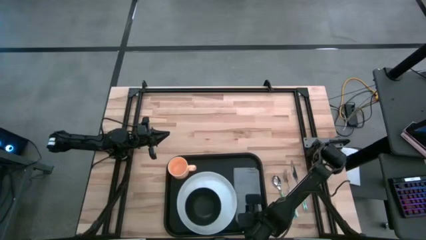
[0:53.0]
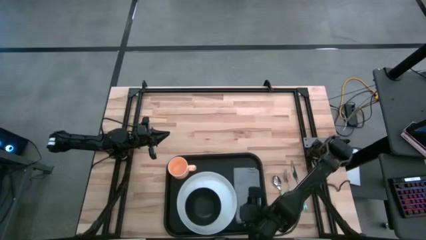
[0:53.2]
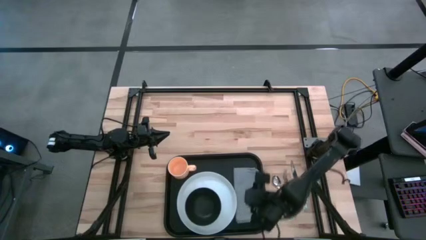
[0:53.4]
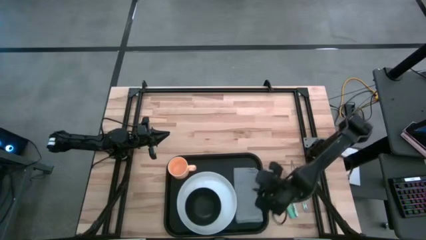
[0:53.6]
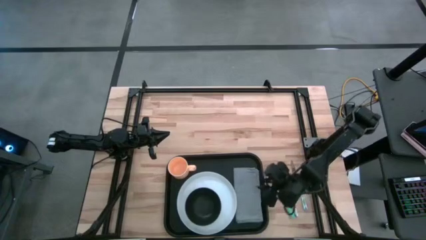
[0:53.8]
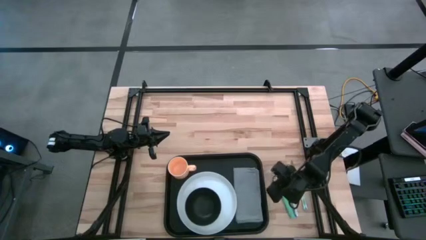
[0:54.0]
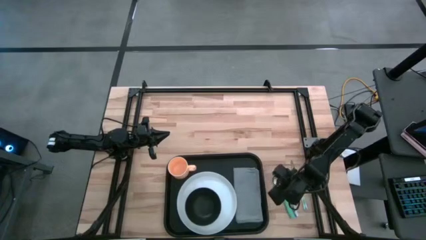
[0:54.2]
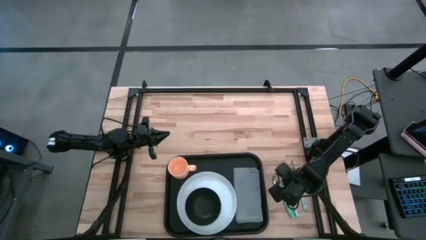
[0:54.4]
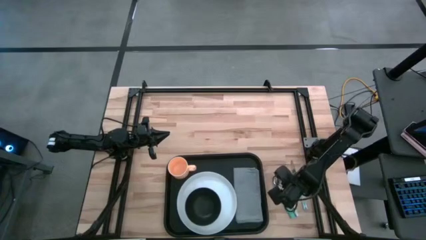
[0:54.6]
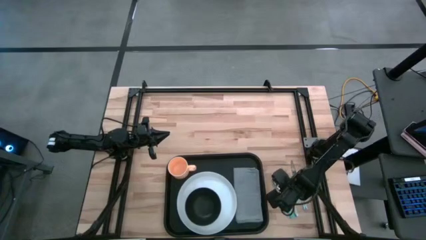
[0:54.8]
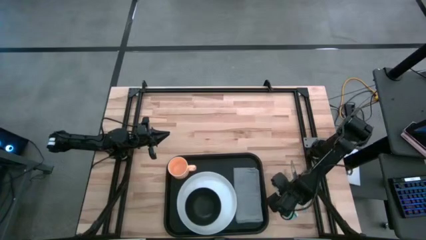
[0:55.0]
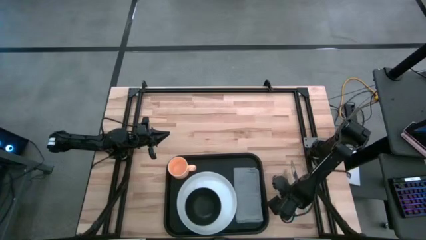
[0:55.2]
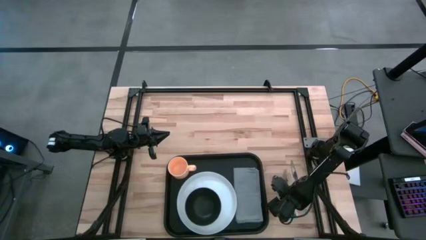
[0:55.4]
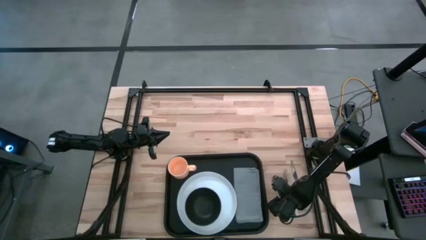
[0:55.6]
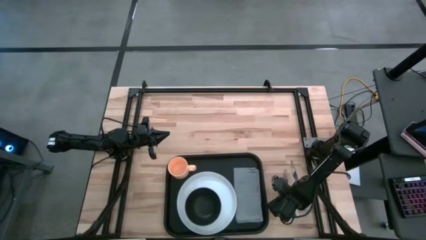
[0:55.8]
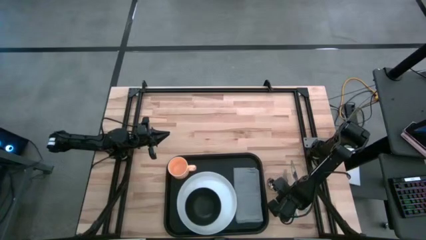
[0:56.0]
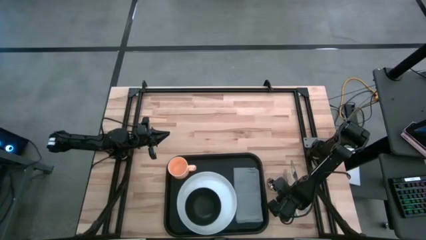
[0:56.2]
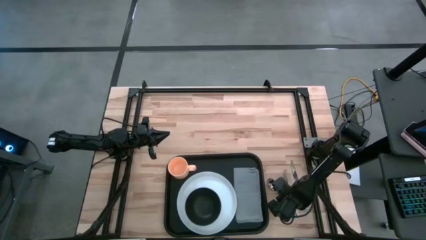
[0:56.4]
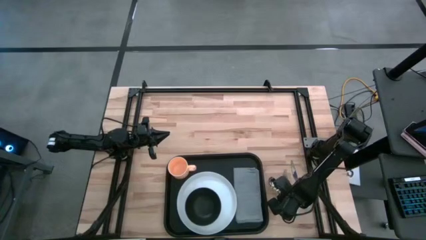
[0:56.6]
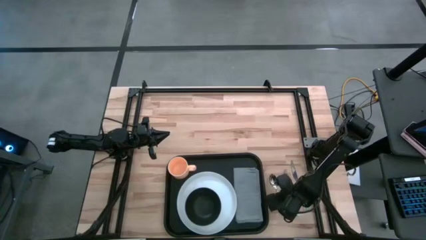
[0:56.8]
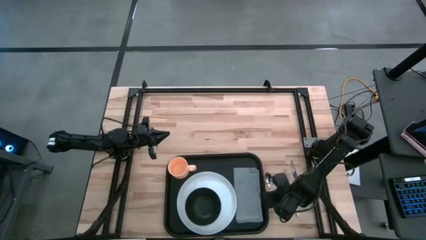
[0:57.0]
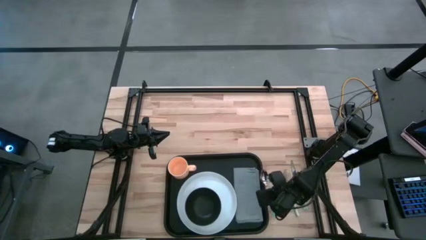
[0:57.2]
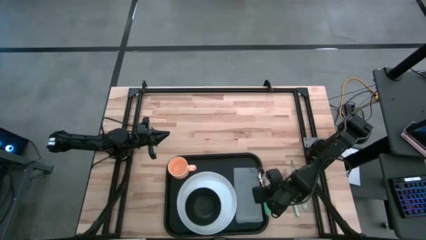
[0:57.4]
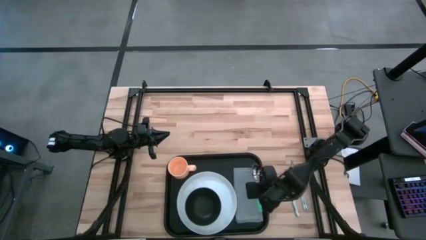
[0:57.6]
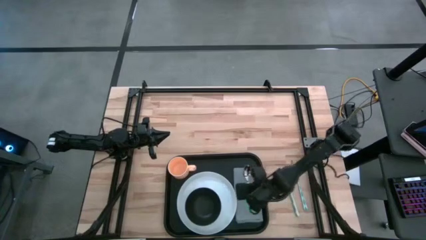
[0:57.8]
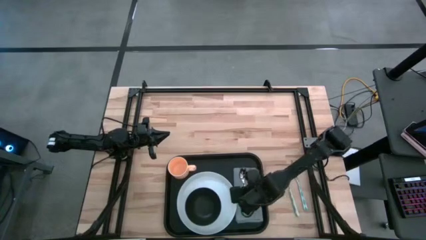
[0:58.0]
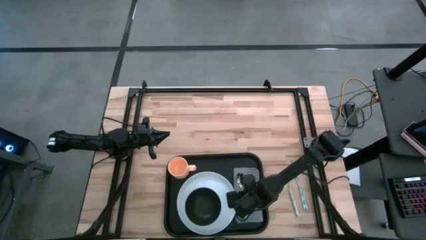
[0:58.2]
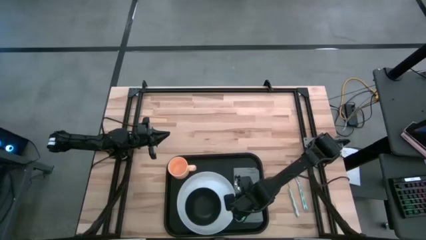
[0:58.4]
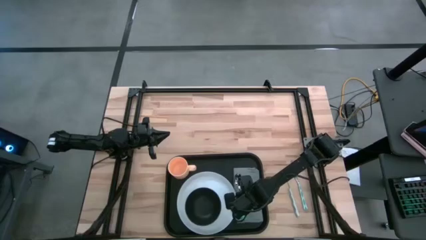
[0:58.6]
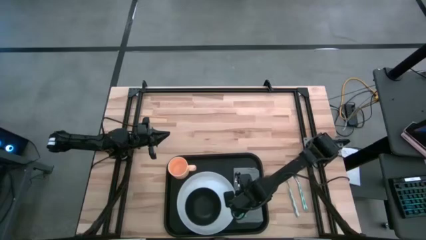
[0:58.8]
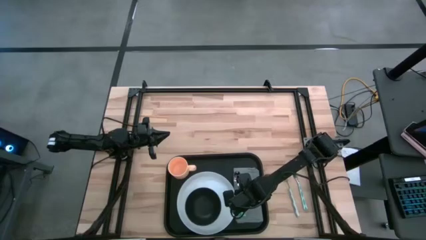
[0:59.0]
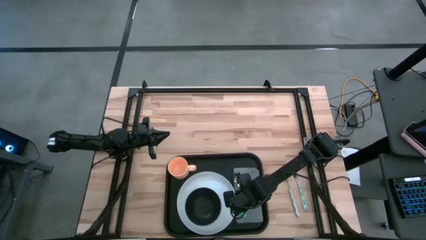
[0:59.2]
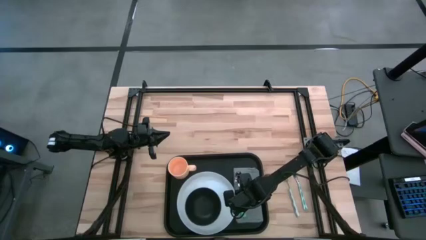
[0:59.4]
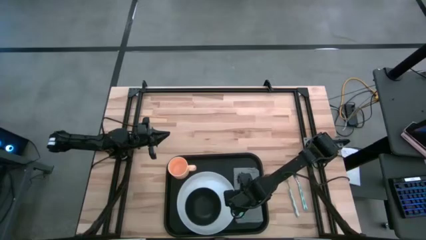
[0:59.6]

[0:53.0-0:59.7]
Task: Set up tray
Put the green spoon on top of the gray napkin on the black tray

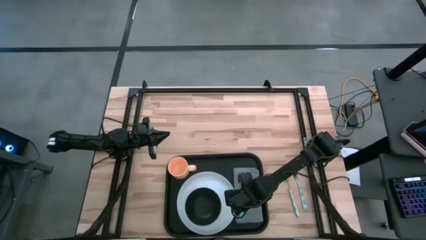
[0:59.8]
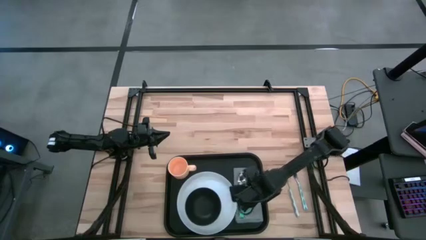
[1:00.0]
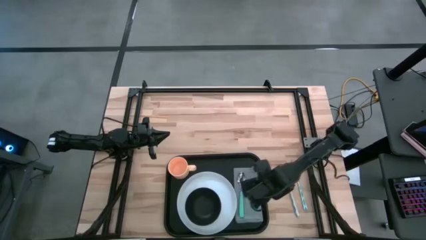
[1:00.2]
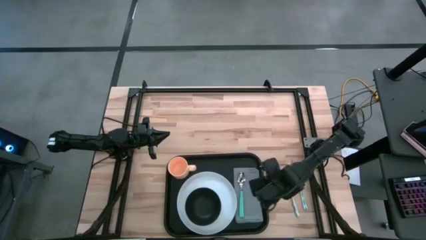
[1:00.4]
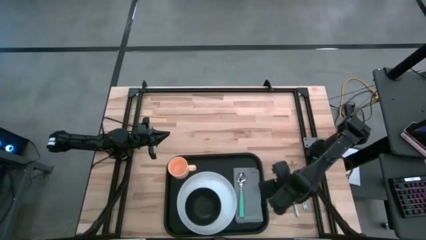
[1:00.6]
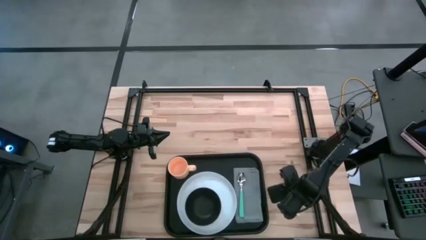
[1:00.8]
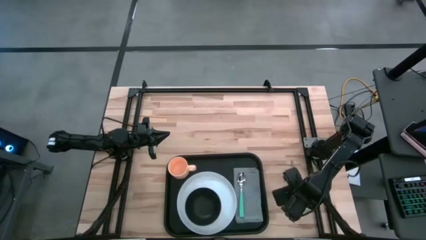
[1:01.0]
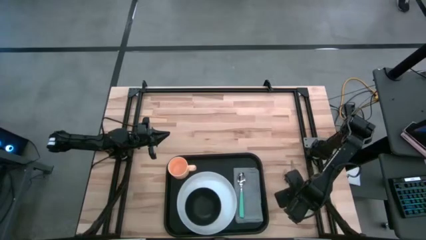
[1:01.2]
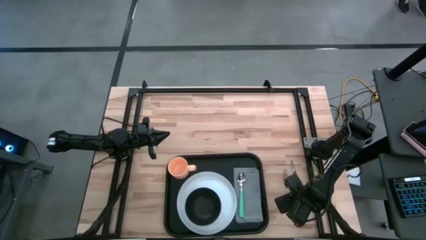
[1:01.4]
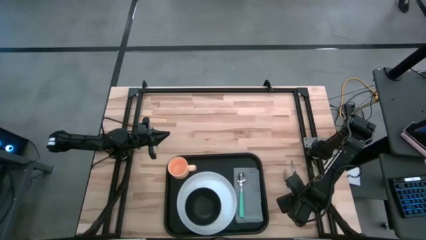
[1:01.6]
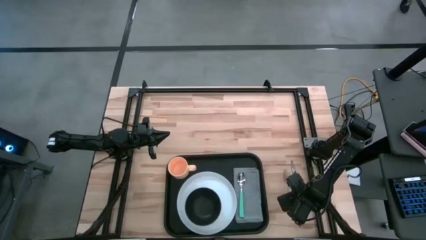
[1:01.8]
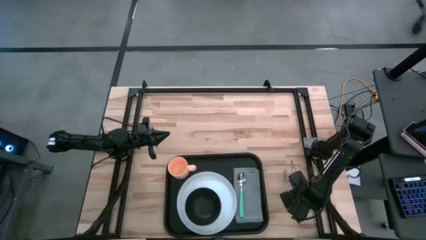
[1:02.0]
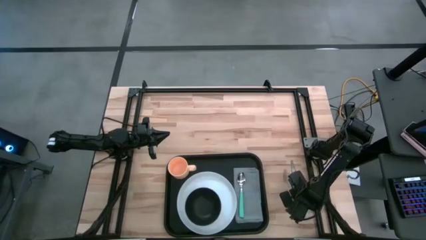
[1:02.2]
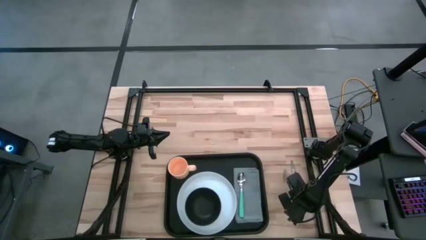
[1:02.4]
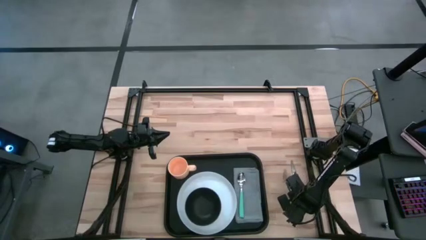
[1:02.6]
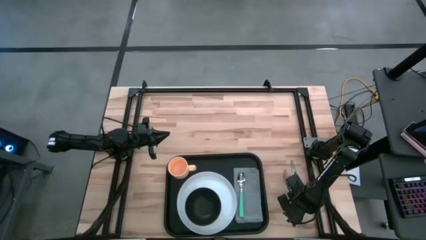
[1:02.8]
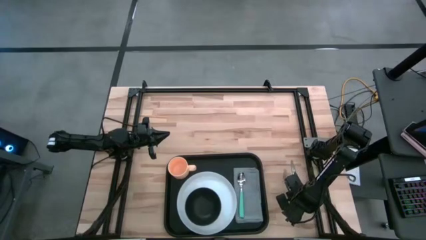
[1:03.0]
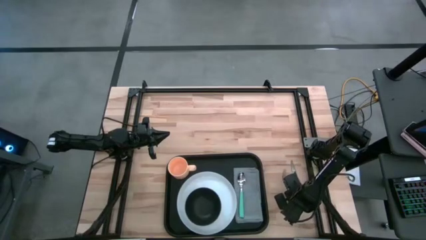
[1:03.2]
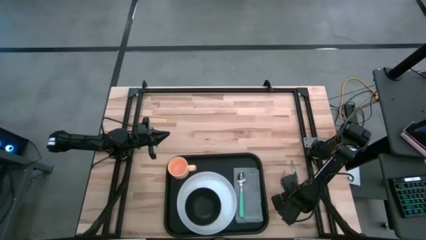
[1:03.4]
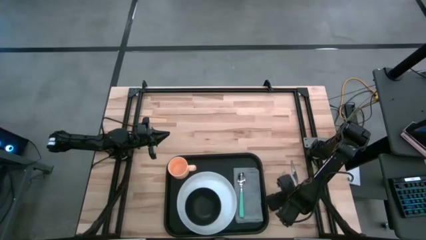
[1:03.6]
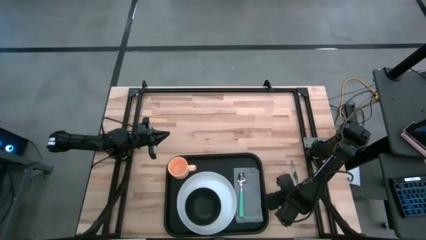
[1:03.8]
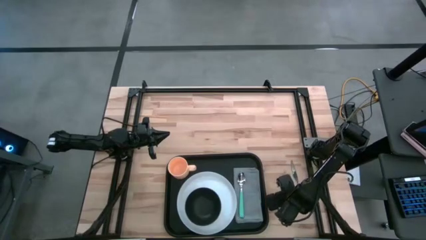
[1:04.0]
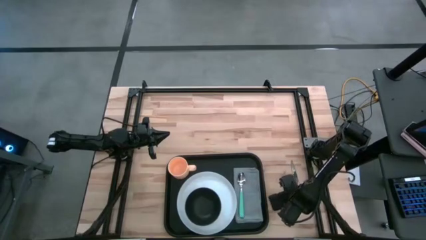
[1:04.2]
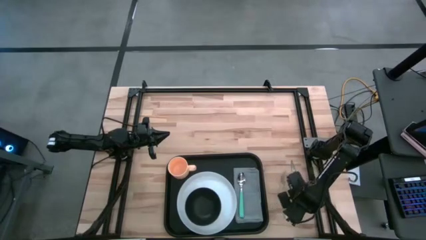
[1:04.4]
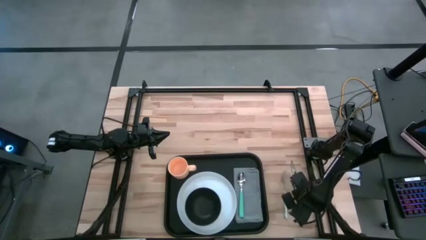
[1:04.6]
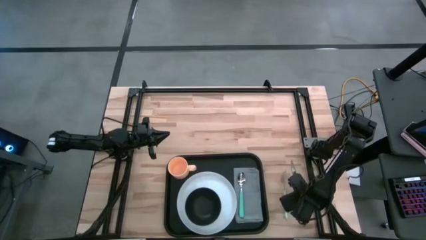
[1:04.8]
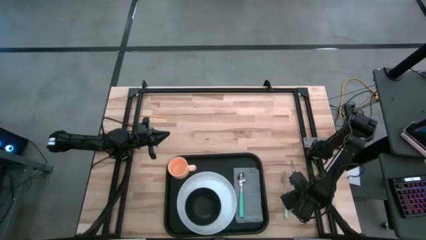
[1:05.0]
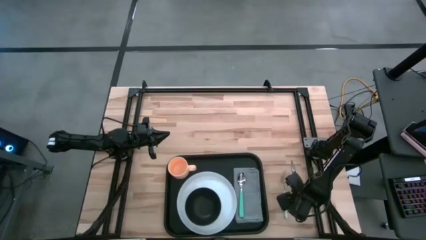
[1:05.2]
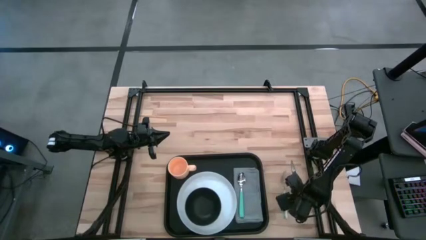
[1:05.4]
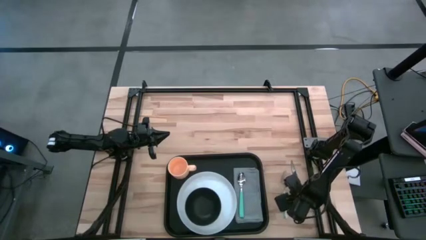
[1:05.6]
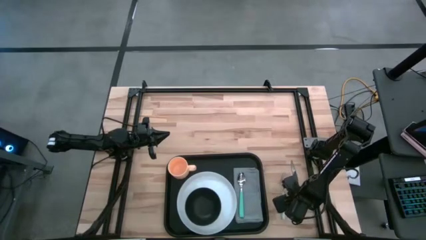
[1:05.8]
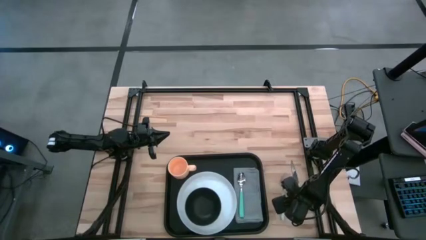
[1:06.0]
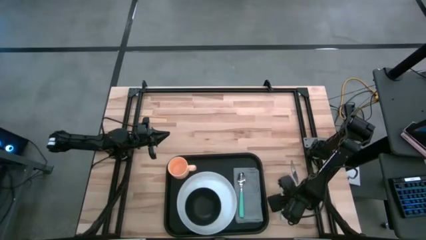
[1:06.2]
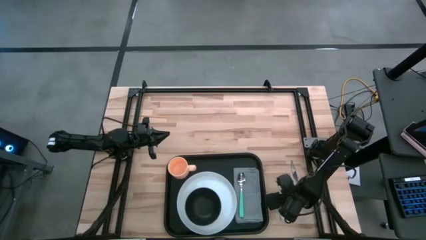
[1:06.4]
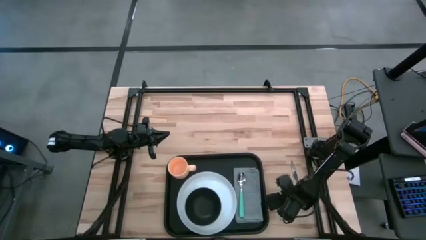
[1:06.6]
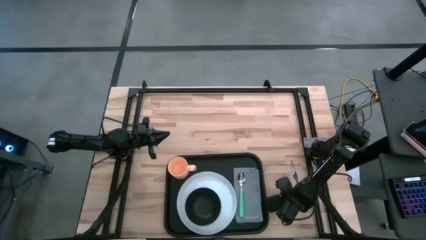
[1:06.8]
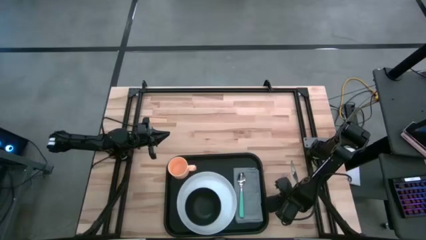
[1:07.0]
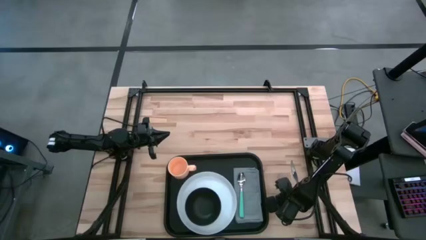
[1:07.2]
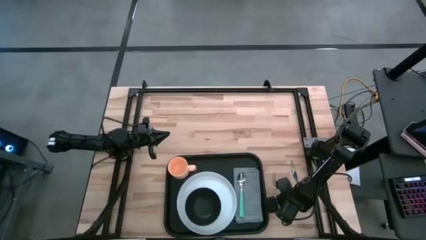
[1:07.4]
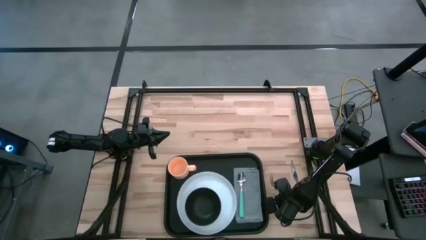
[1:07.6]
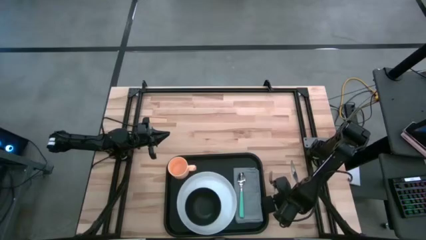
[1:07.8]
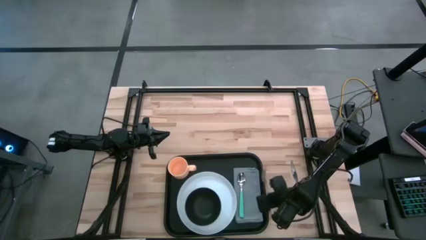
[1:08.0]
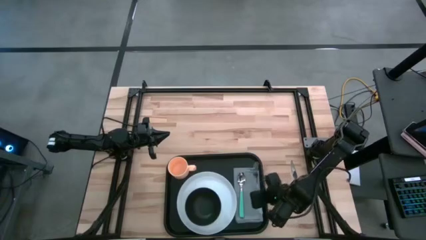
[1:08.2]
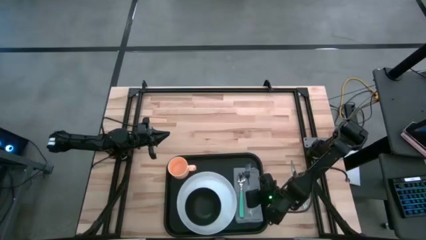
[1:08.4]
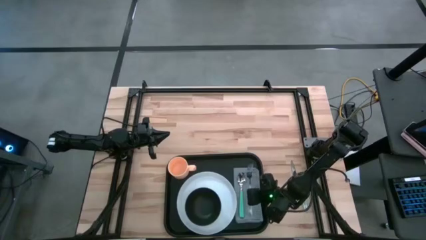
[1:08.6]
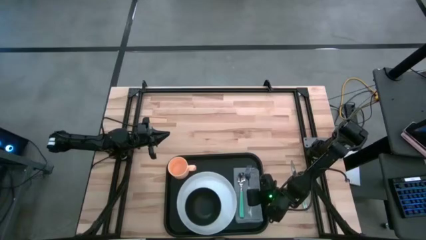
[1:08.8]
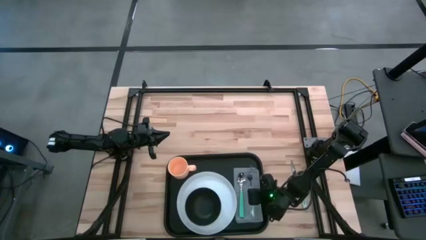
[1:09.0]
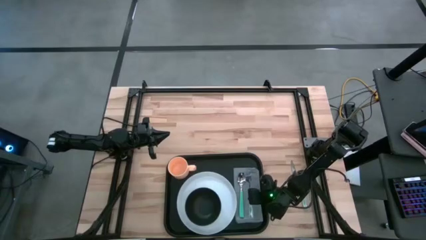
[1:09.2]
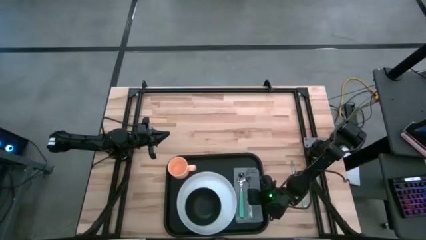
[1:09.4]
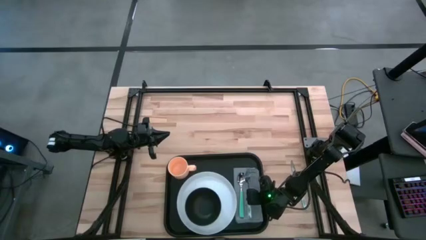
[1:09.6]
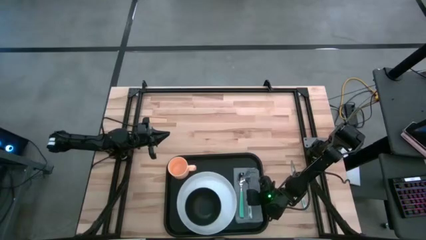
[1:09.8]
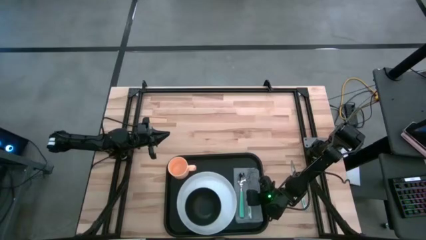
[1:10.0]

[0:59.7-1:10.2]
Put the blue patterned fork on top of the gray napkin on the black tray to the right of the green spoon
